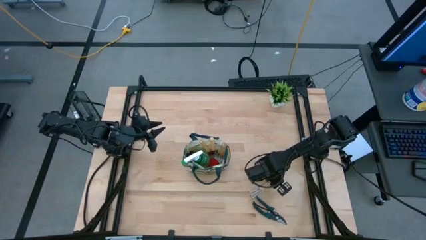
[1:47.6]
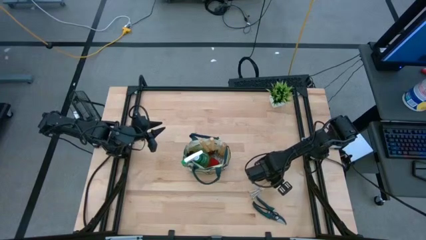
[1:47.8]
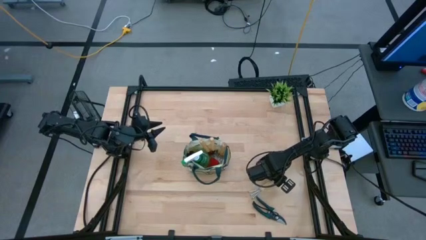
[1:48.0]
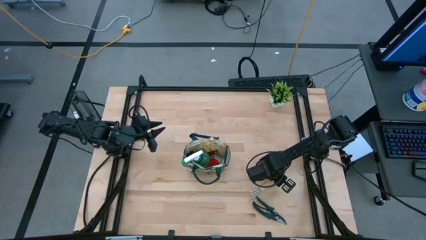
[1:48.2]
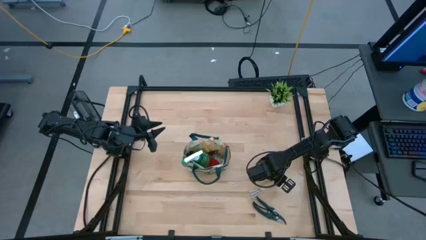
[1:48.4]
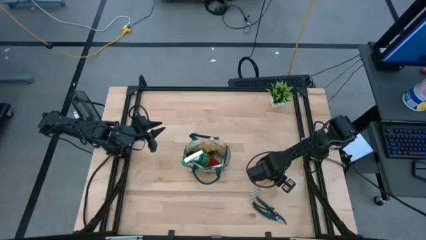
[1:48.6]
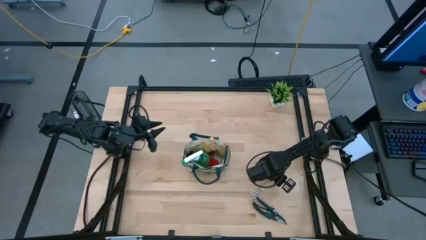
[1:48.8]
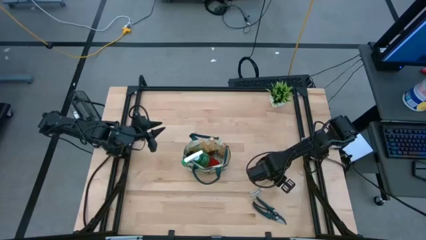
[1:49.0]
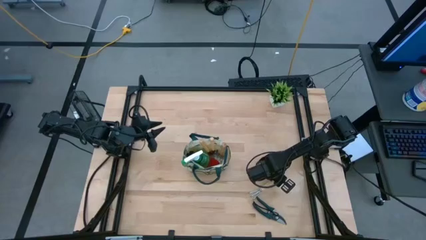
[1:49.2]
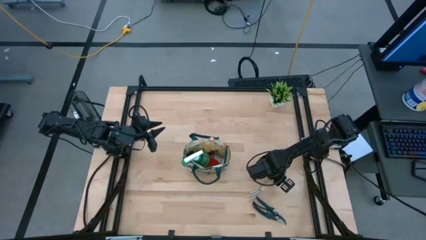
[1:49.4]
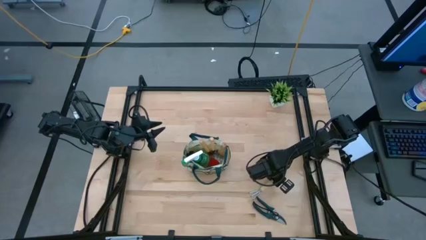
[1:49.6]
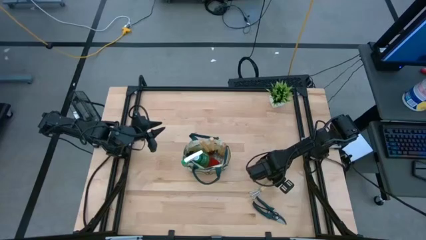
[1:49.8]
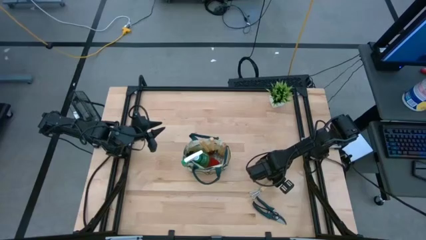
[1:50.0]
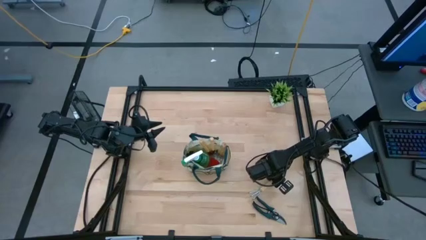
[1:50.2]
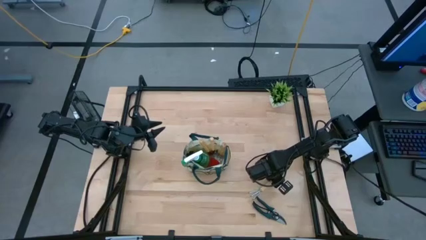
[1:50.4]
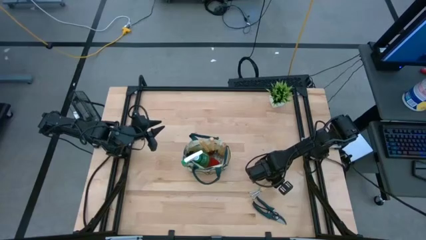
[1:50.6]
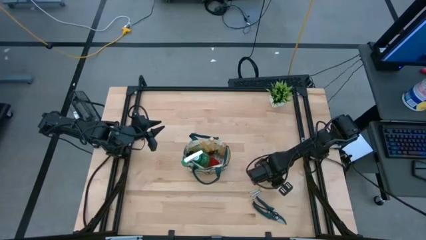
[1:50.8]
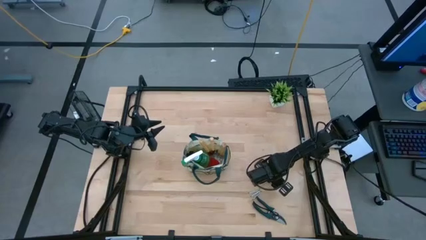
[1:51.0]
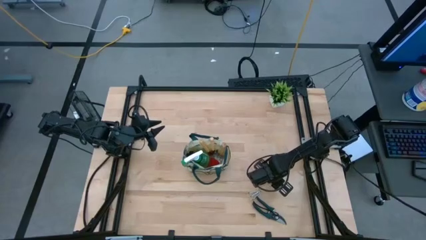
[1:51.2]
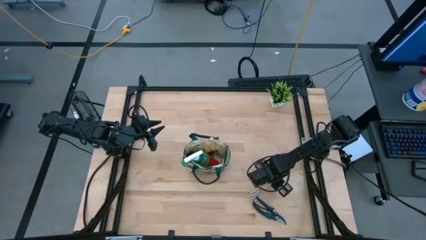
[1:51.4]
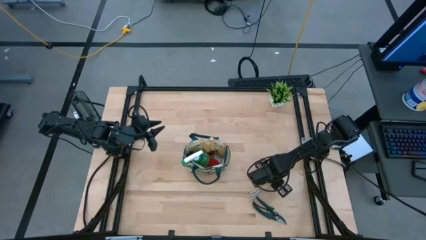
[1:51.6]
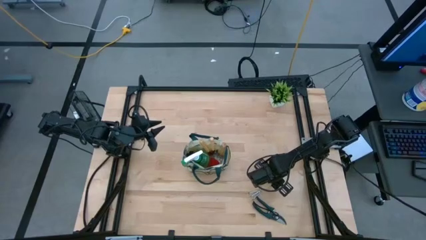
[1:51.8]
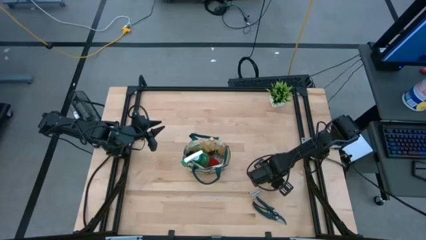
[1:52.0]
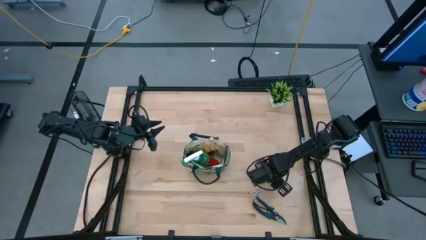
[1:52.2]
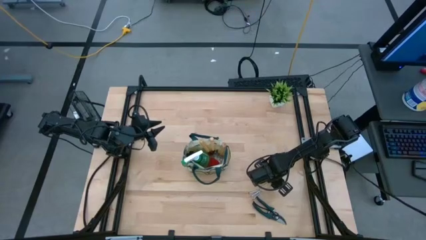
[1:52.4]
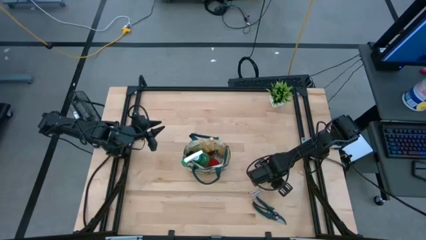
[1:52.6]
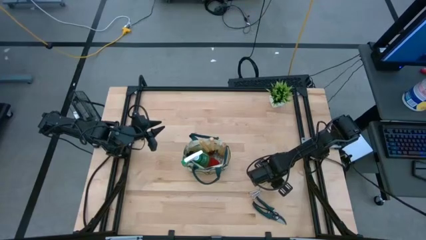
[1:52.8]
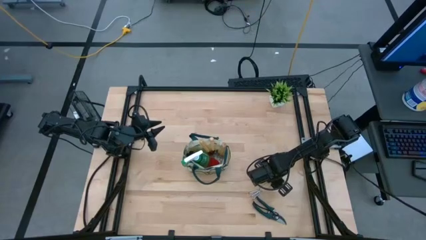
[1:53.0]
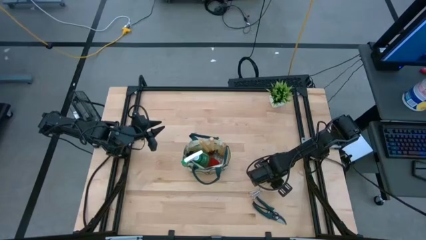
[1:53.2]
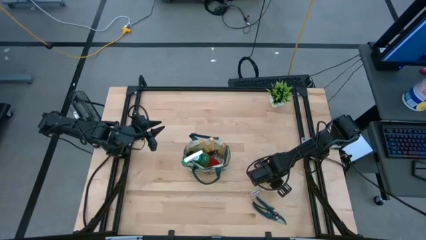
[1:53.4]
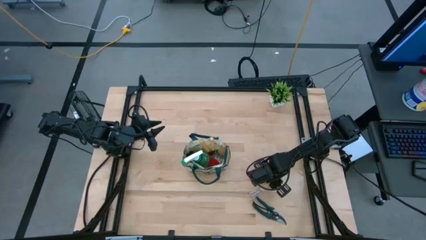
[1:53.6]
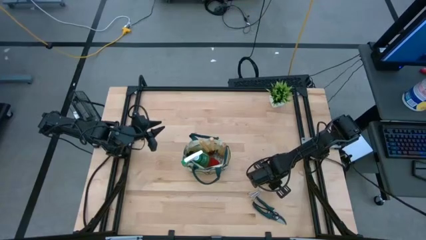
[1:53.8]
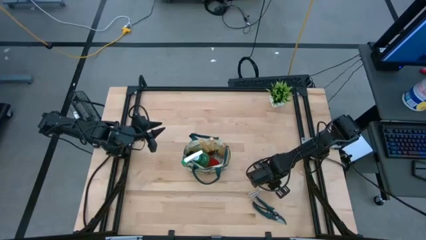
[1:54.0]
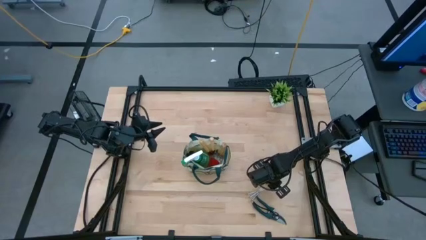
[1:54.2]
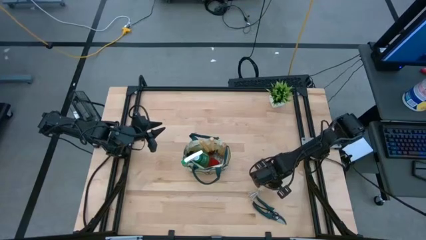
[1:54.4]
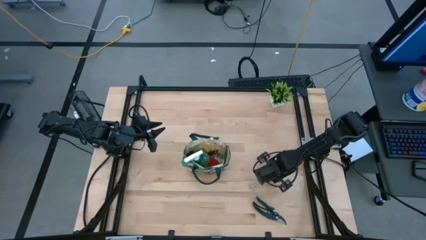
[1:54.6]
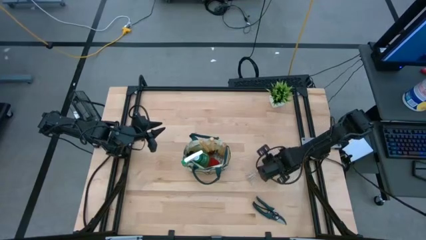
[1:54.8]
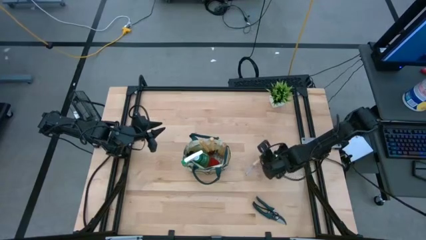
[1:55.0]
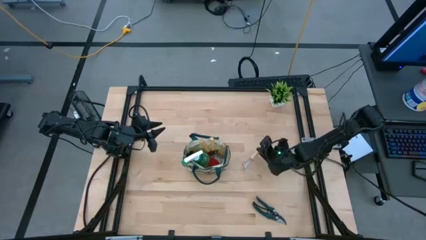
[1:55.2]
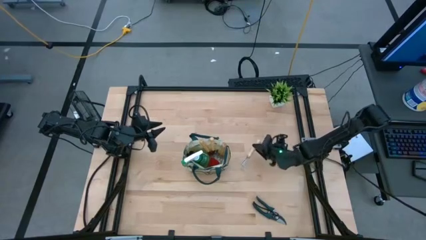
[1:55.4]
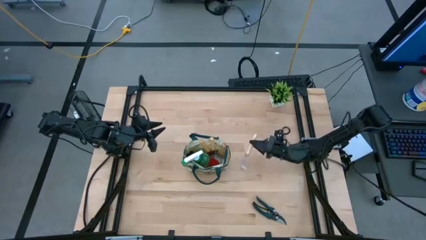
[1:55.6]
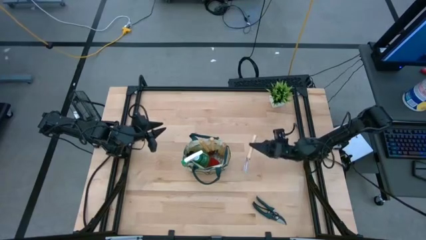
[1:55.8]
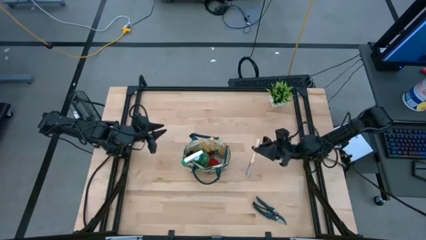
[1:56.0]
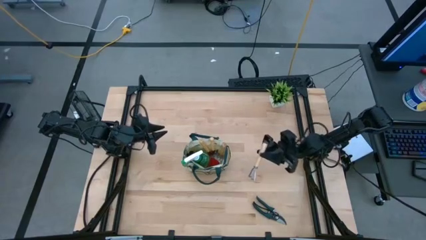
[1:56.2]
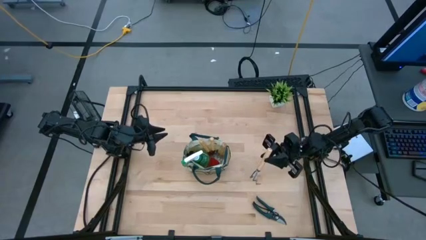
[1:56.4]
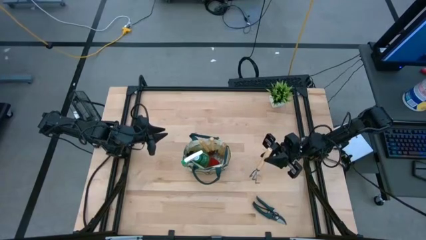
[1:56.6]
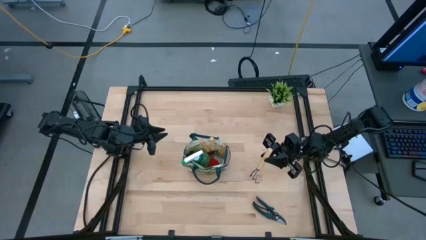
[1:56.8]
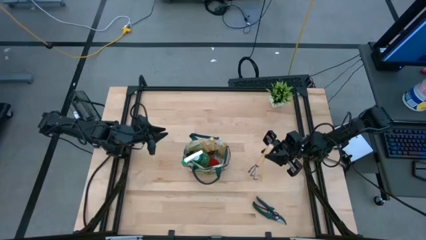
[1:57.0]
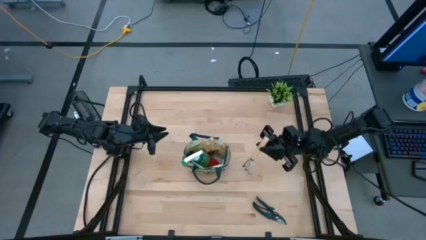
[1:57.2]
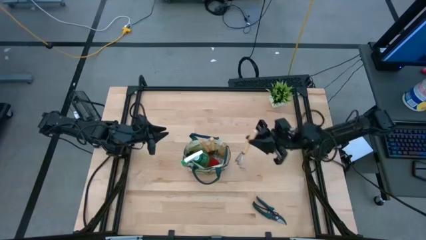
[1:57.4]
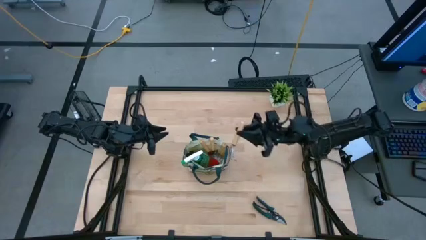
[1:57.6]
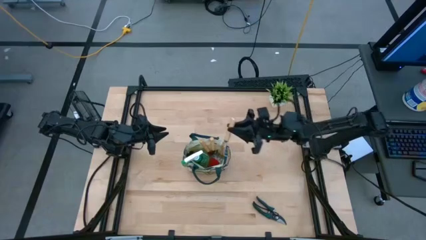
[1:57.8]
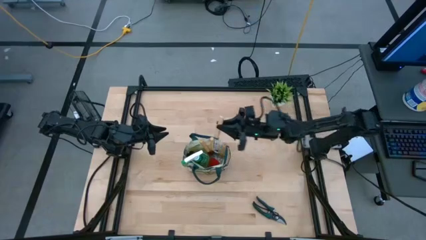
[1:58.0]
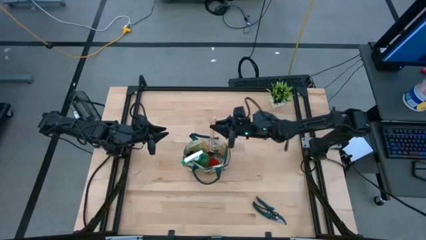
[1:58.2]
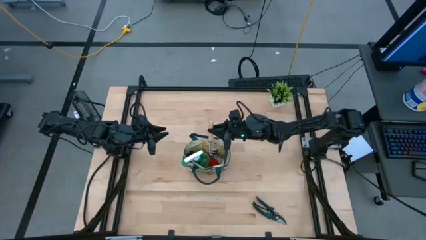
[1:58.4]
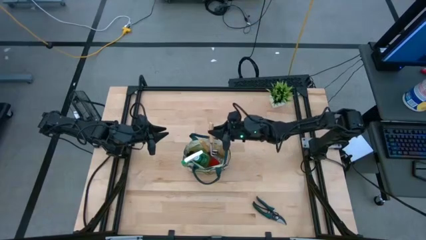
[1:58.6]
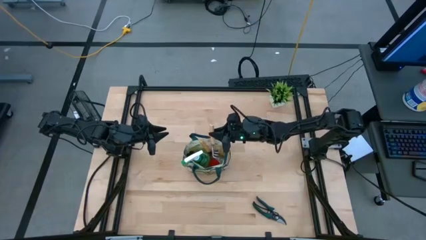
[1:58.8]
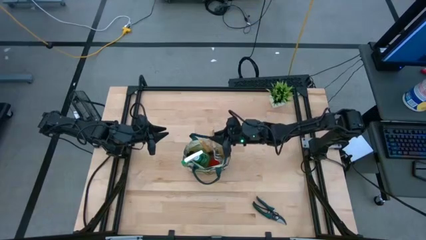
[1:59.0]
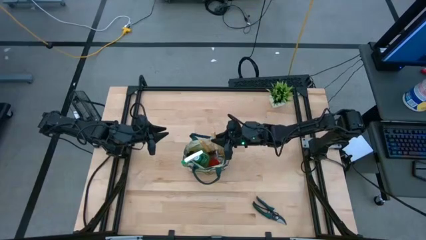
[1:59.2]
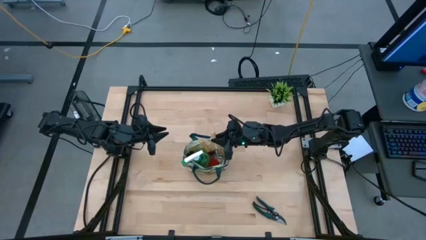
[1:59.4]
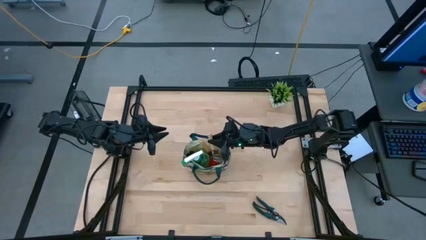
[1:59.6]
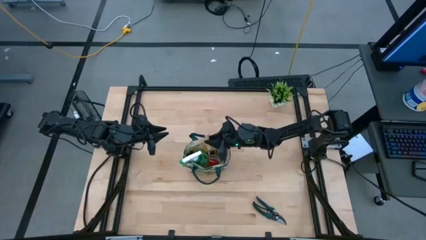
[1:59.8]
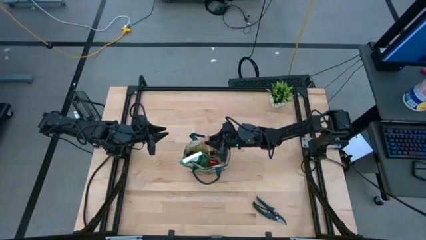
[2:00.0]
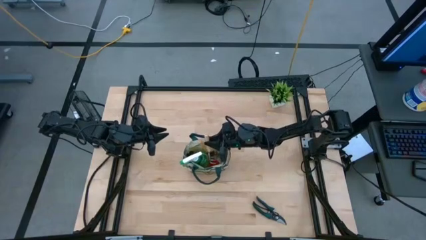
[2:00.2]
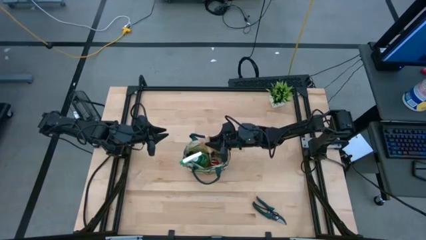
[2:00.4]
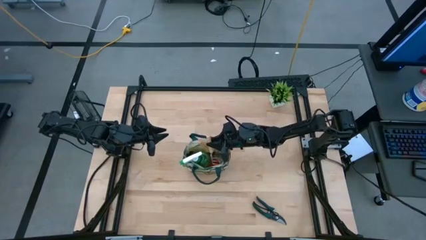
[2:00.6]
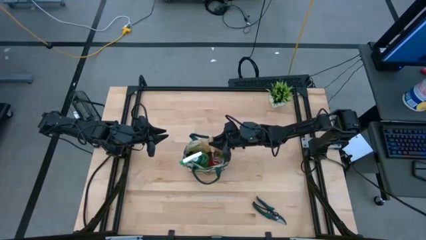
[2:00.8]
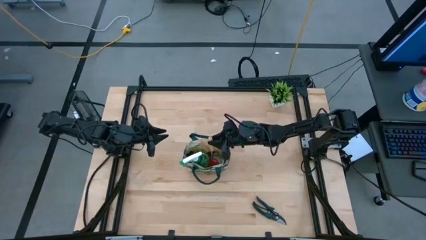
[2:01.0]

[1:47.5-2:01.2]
Task: Pick & Place Garden tools in Gardening bag
Put the brown hand rake into the white gardening bag

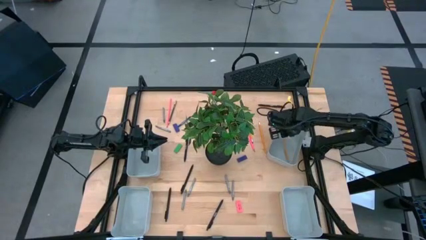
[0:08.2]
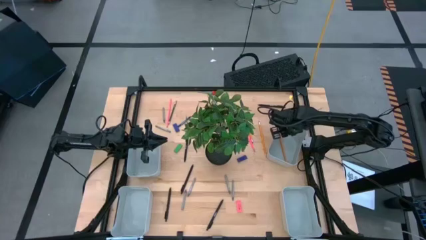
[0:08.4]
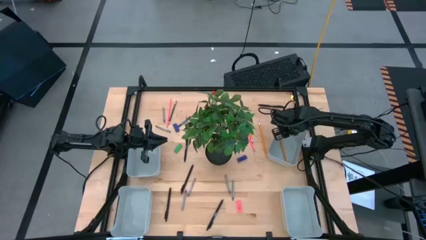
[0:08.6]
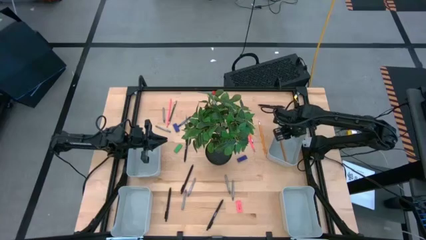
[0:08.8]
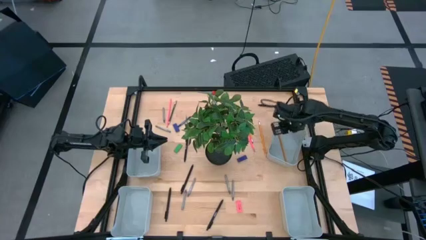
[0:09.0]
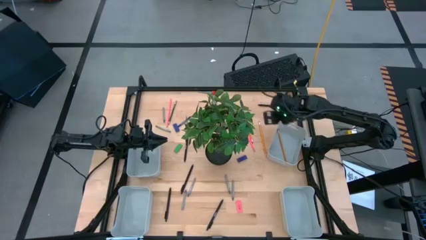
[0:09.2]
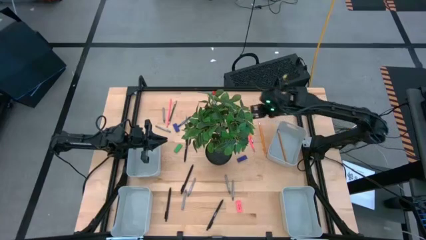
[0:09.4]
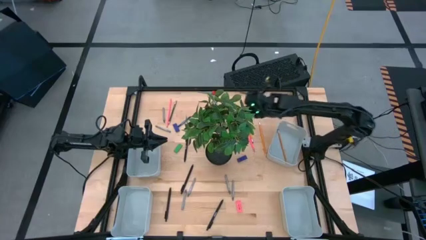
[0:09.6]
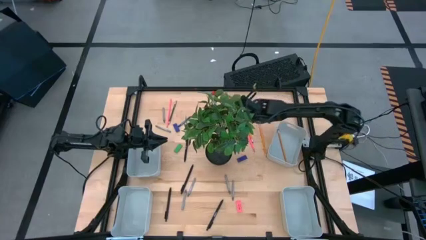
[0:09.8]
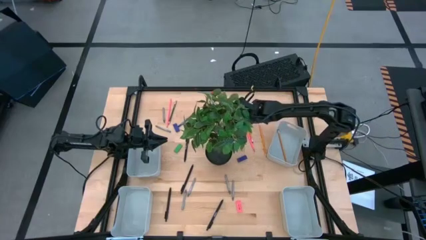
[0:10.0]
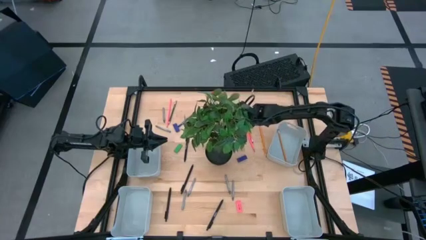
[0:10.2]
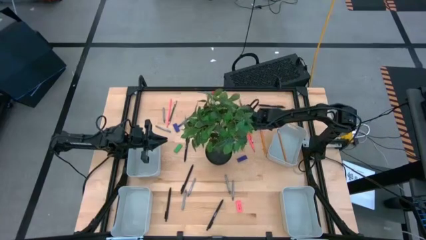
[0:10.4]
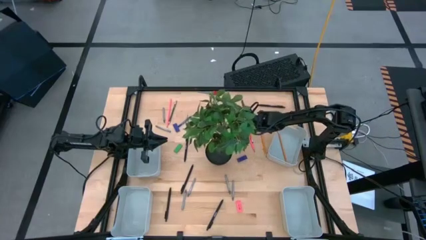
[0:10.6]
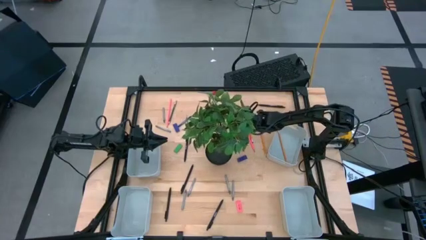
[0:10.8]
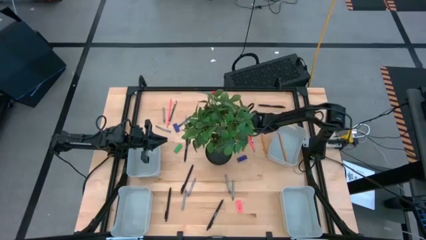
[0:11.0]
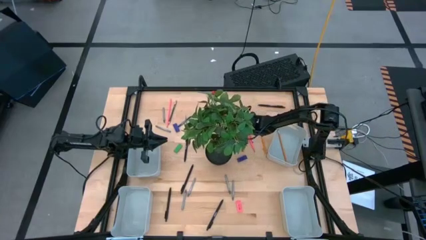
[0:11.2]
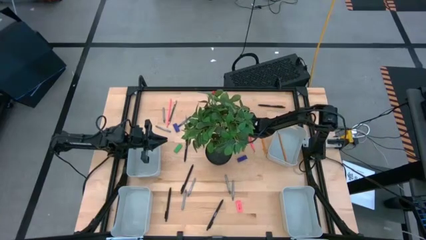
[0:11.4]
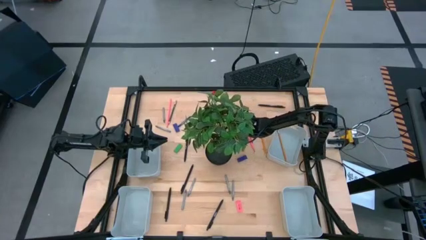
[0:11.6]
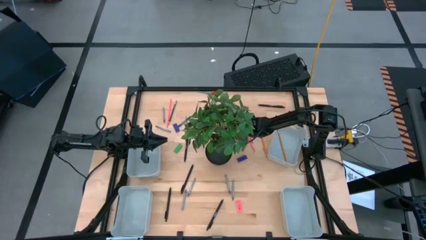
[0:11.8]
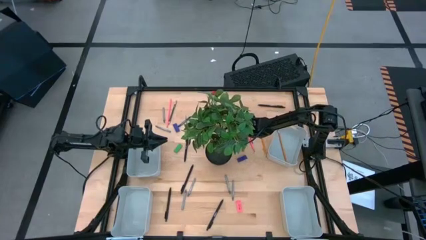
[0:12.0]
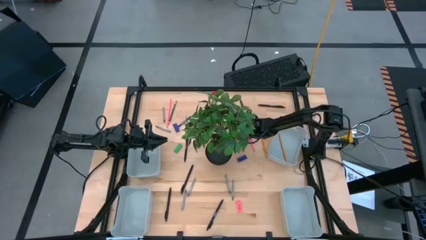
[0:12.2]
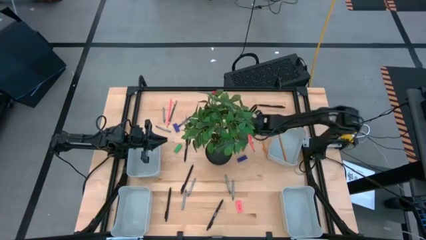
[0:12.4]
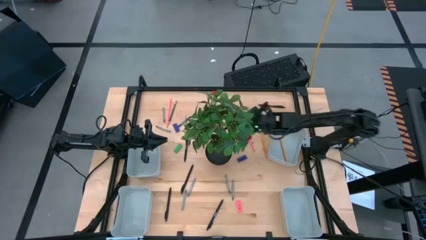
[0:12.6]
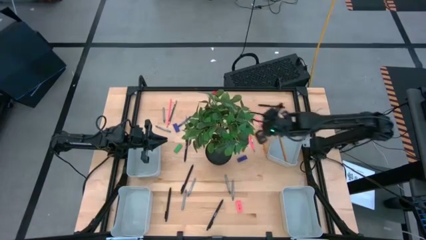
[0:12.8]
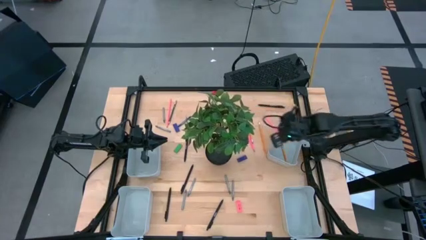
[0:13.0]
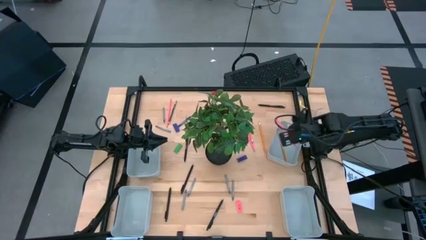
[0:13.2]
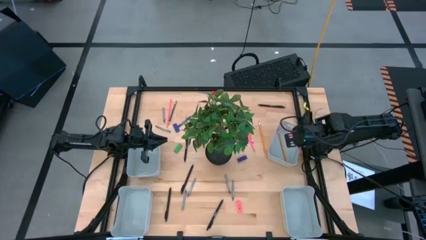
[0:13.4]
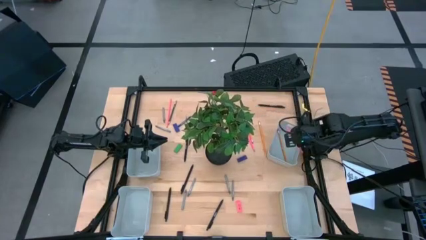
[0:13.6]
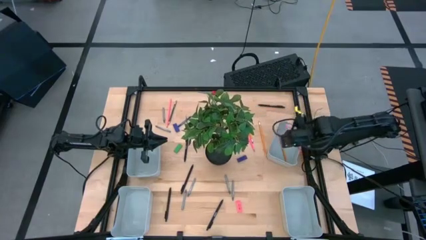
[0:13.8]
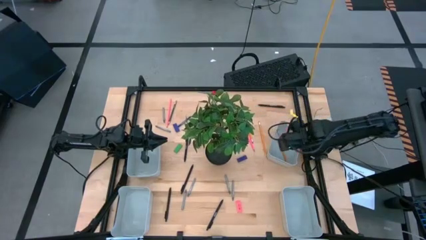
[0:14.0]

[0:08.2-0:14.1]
Task: Sort crayons/erasers/pens/pencils in bins
Put the pink pencil into the top right gray bin
